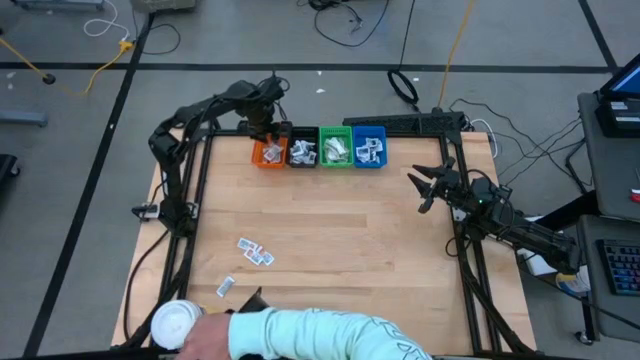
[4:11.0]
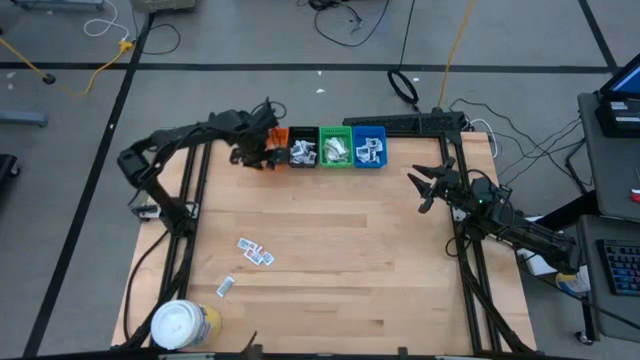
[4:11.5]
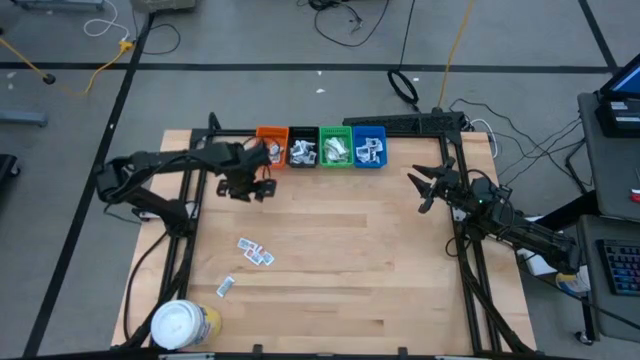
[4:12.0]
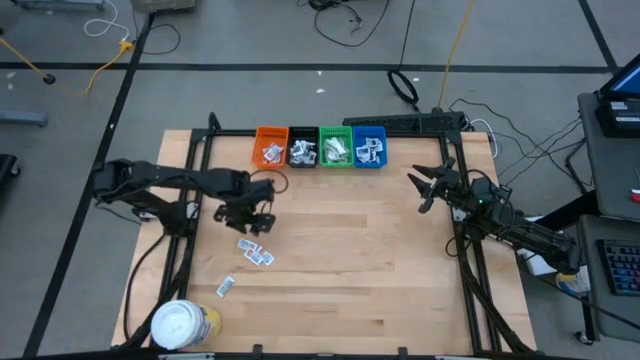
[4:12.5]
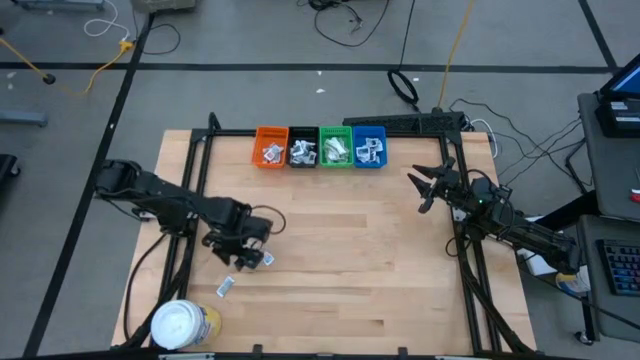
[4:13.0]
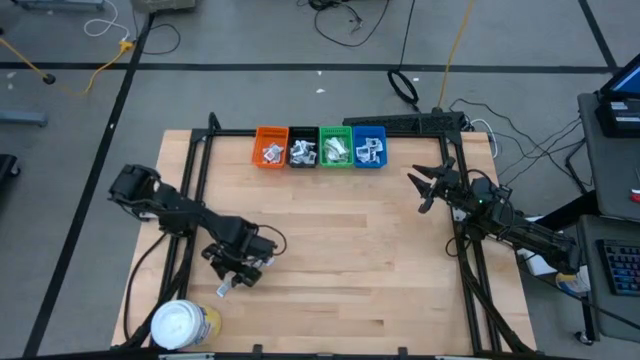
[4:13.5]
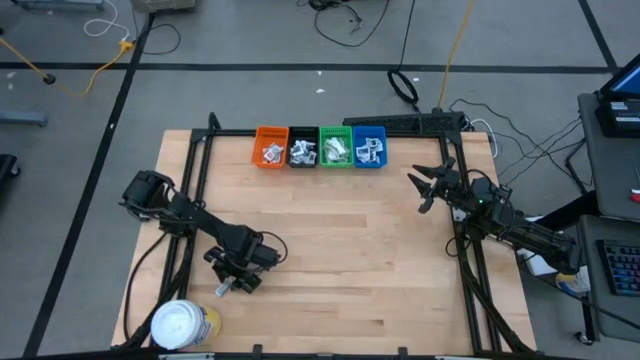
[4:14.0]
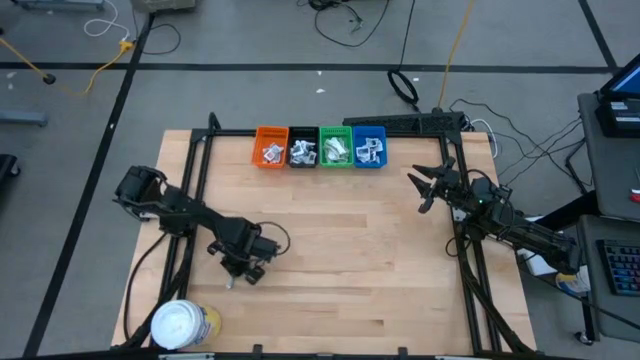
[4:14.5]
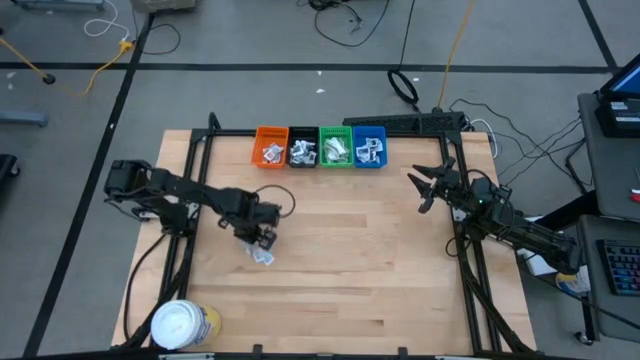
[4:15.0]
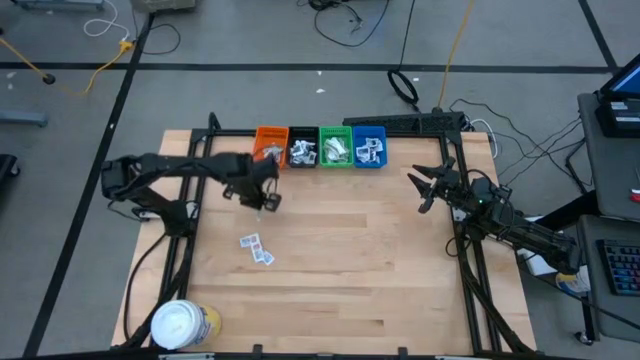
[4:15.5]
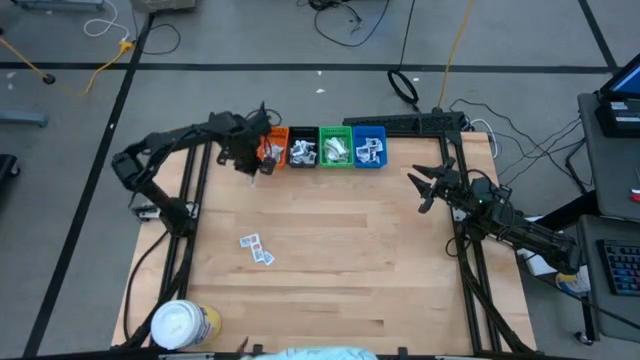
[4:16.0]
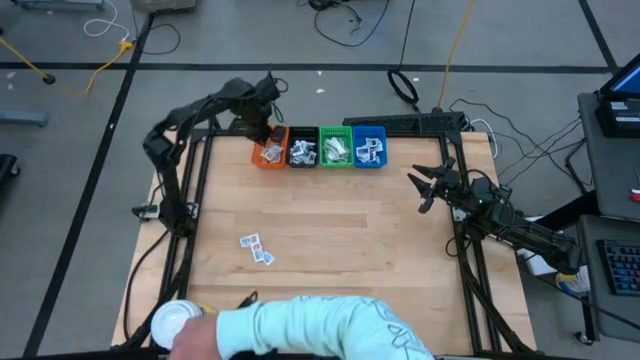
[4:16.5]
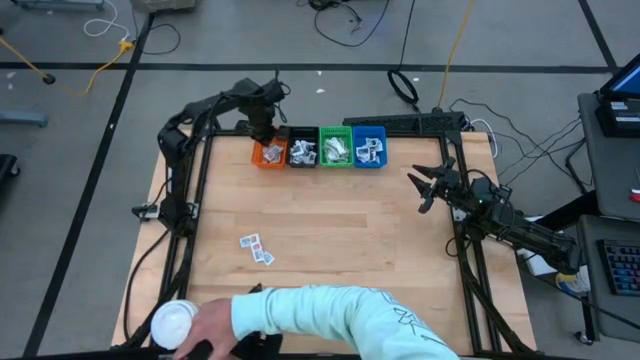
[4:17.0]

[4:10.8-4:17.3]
Task: Pick & Place First Aid Supplies
Put the red packet into the orange bin

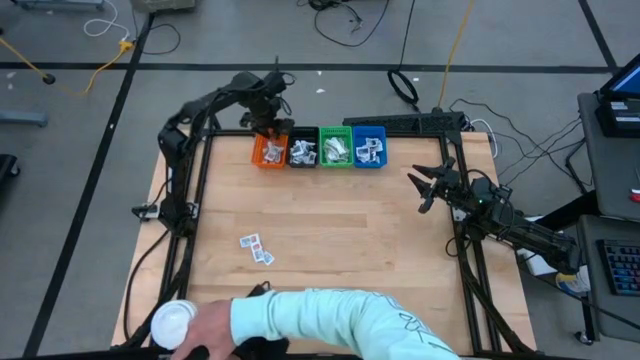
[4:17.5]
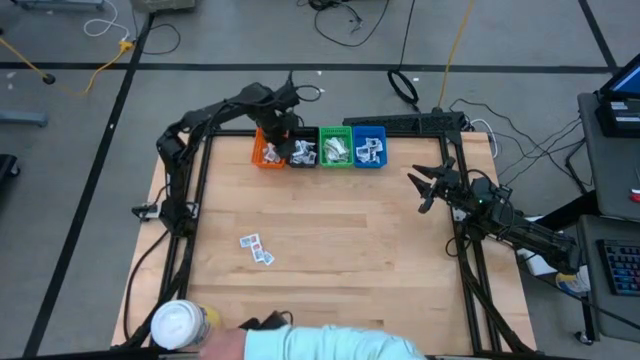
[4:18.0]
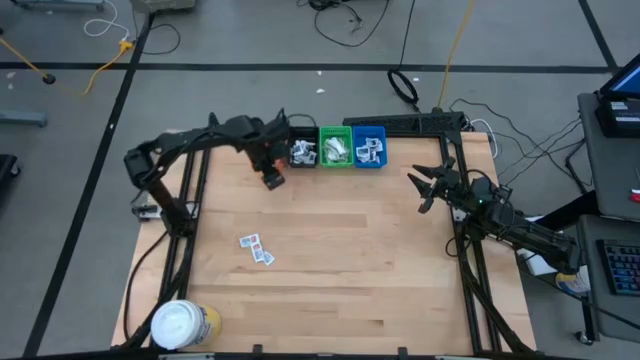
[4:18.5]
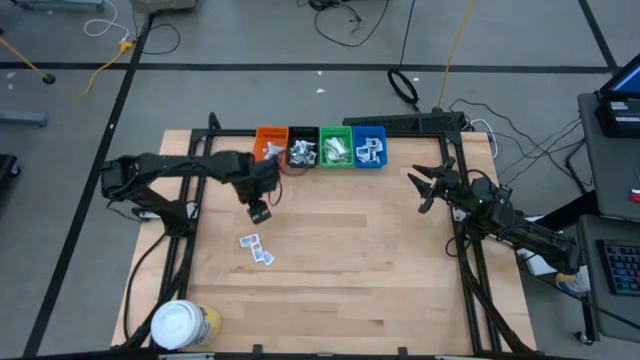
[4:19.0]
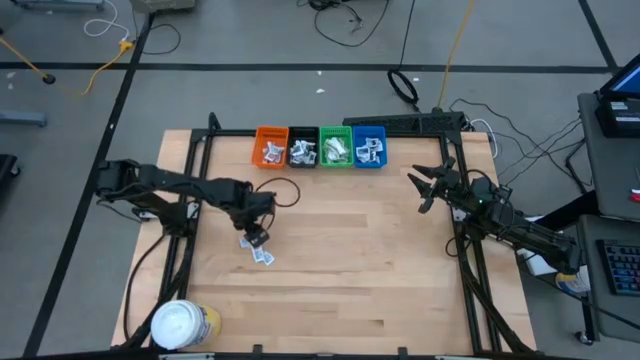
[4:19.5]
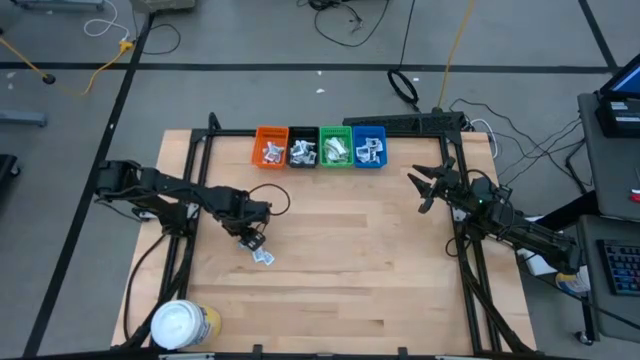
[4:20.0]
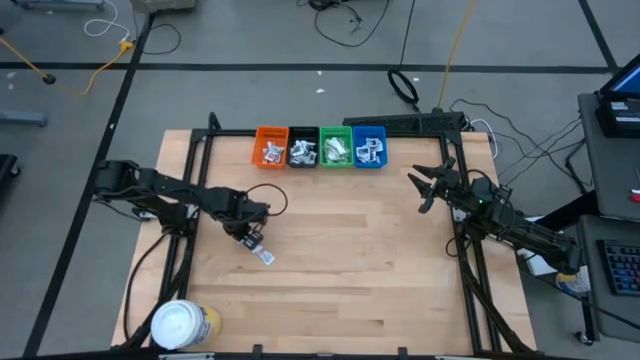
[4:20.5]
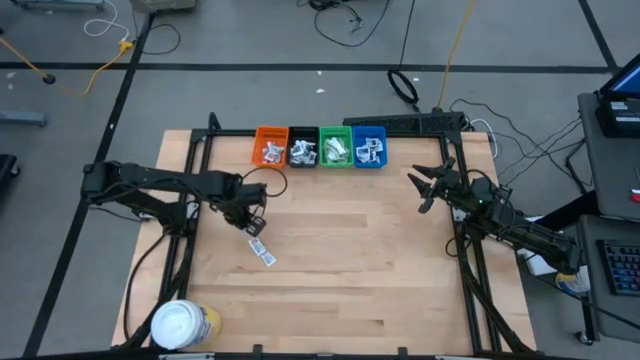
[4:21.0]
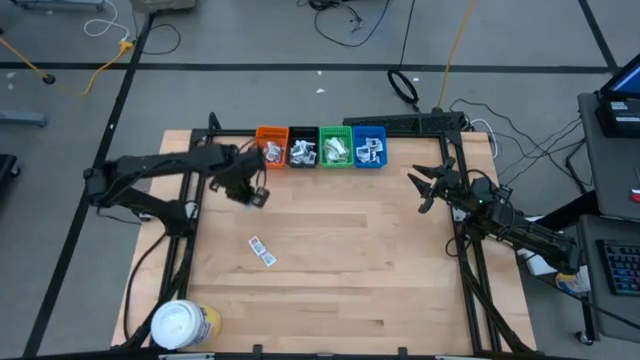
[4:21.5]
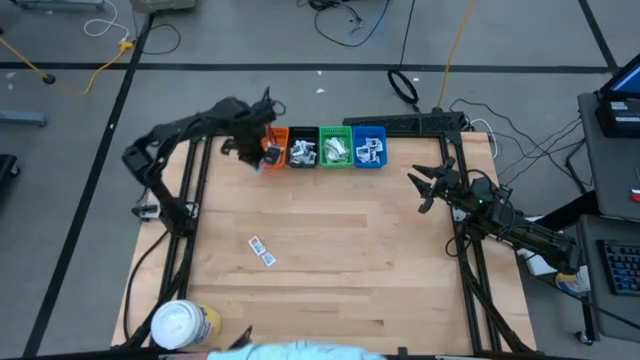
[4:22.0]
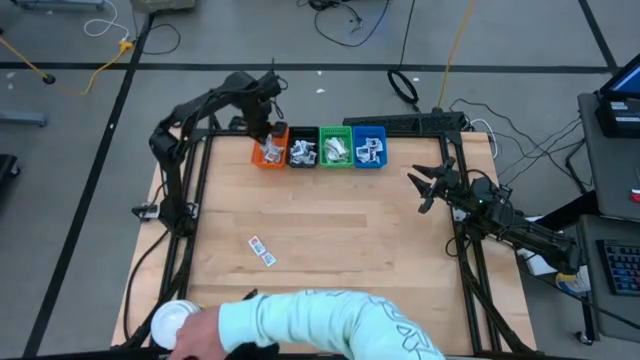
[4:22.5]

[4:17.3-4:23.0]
Put the red packet into the orange bin

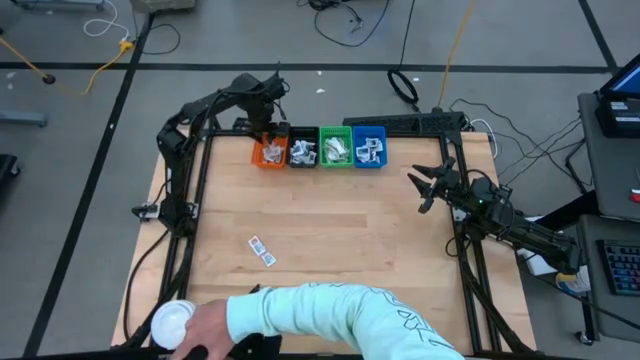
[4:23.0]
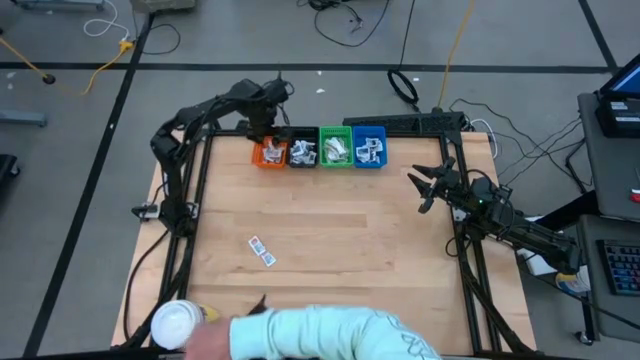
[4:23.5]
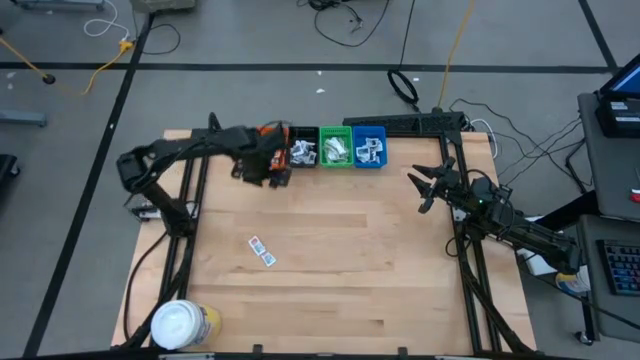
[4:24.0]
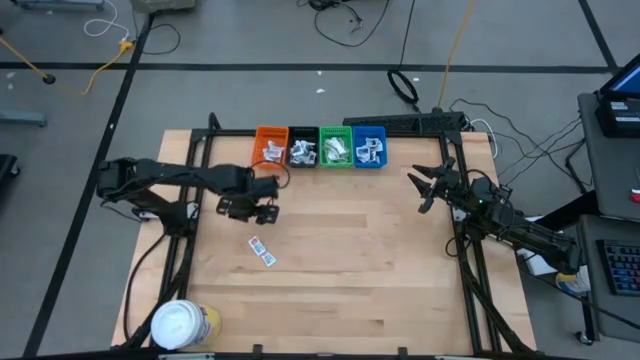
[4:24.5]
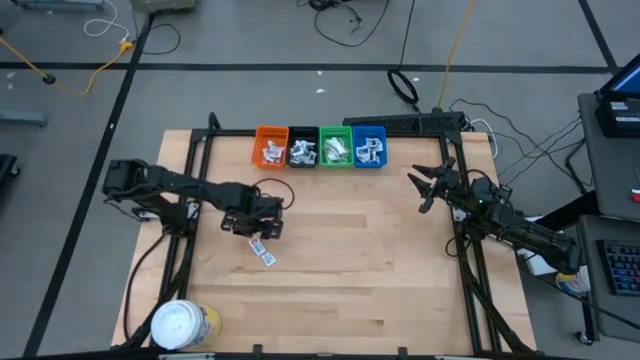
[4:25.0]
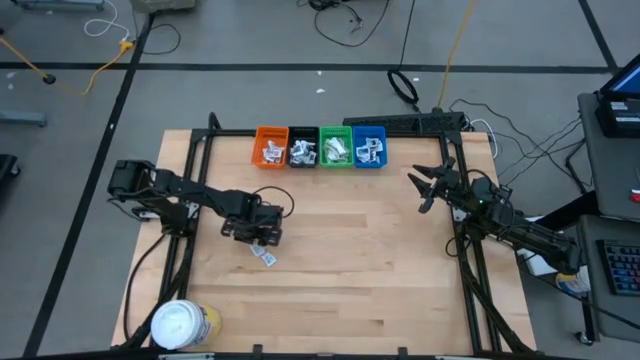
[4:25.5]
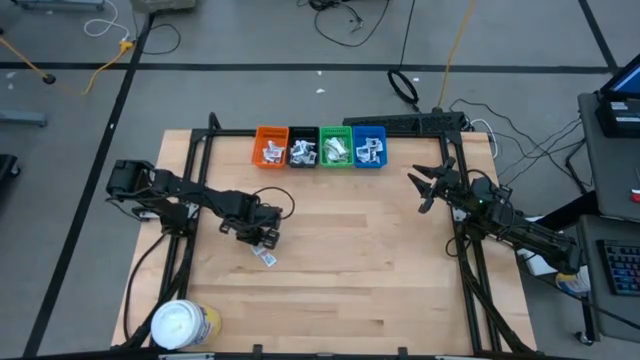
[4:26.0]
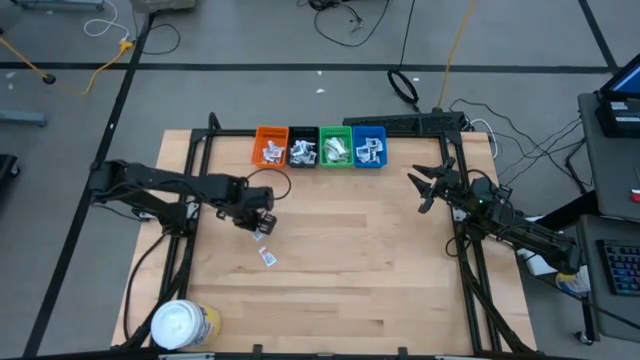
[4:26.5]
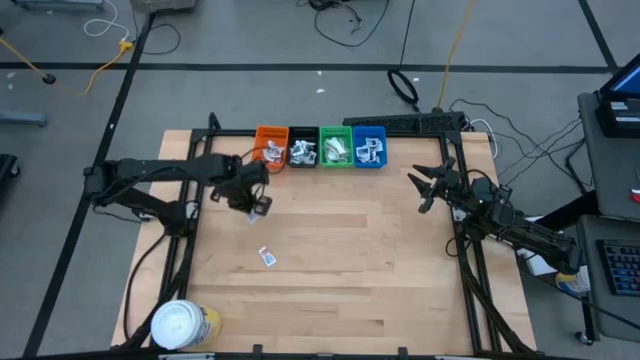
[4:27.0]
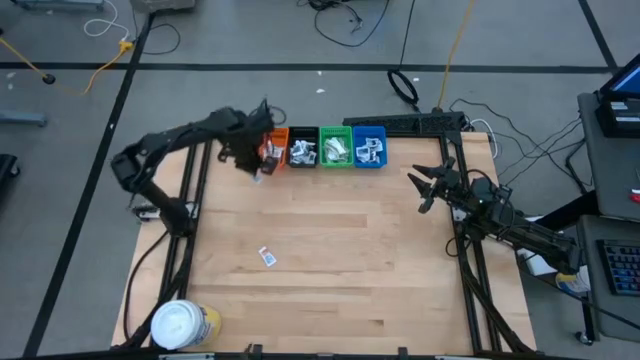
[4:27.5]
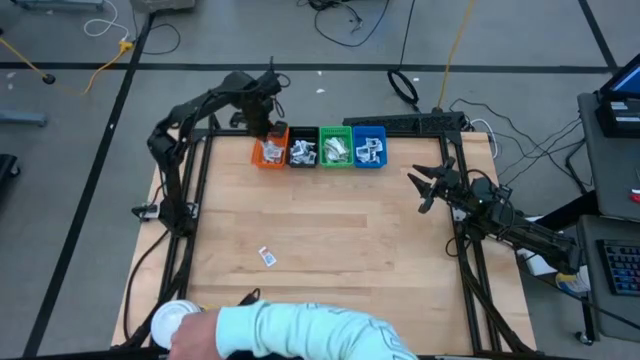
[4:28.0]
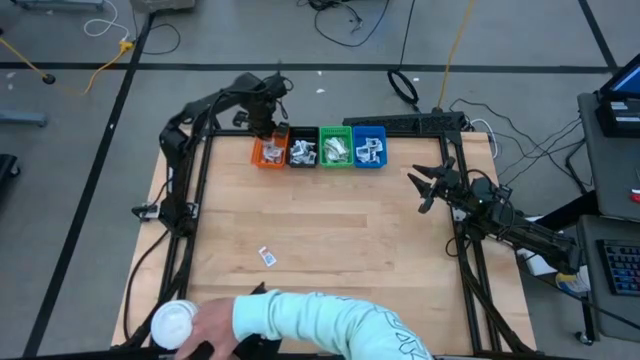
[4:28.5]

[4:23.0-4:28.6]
Put the red packet into the orange bin

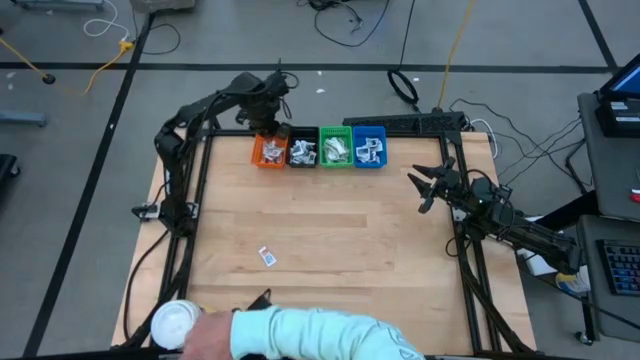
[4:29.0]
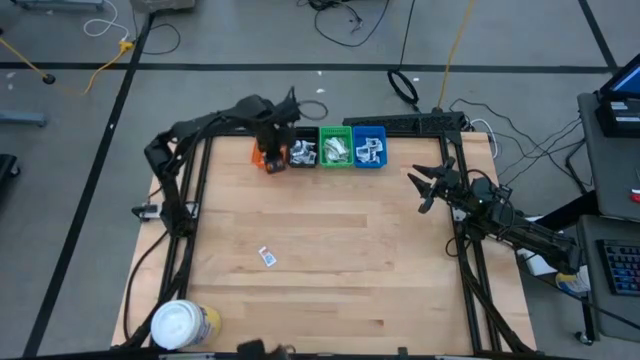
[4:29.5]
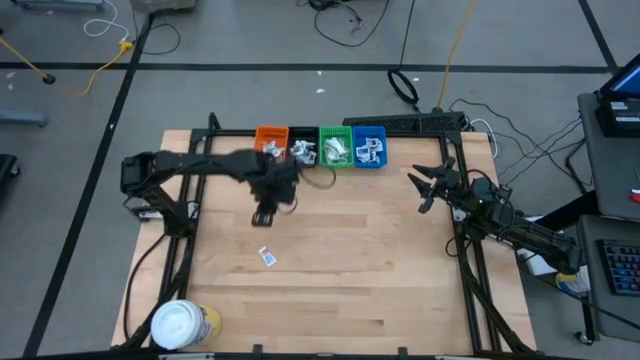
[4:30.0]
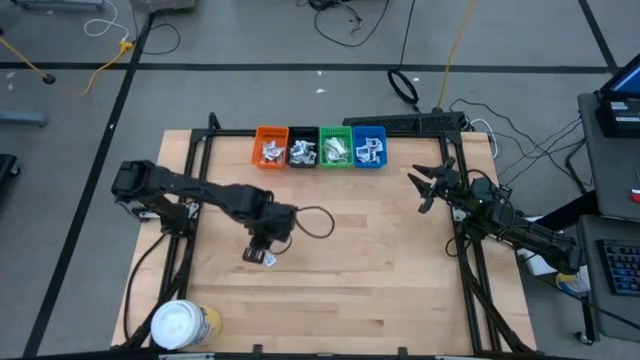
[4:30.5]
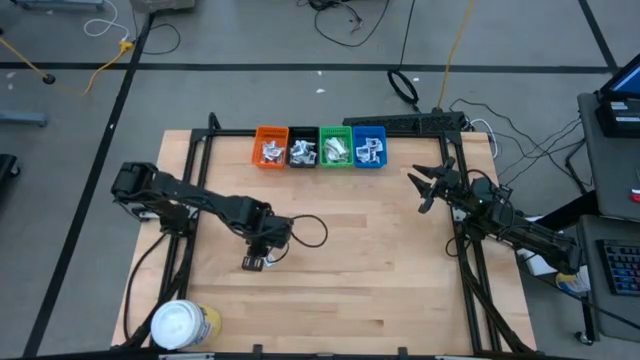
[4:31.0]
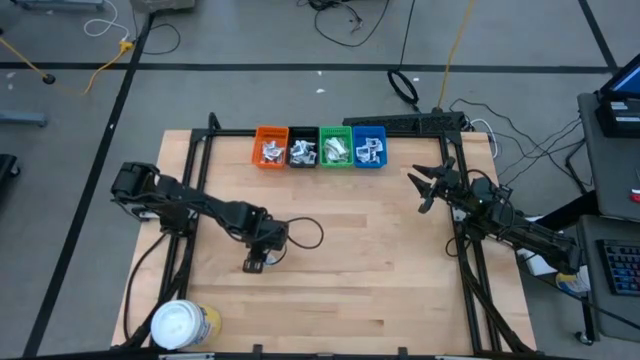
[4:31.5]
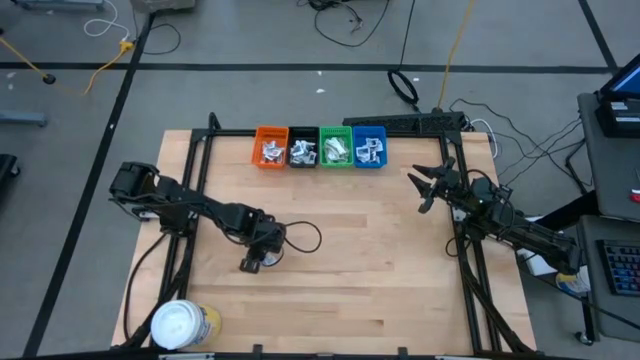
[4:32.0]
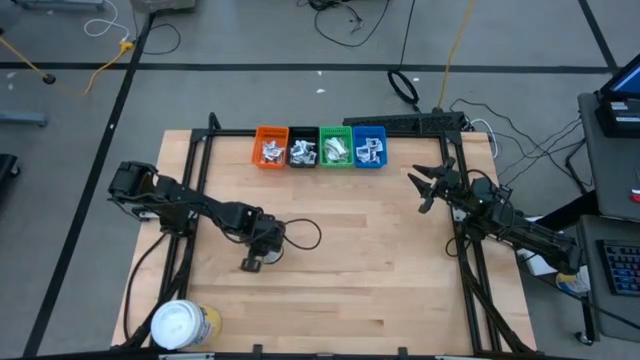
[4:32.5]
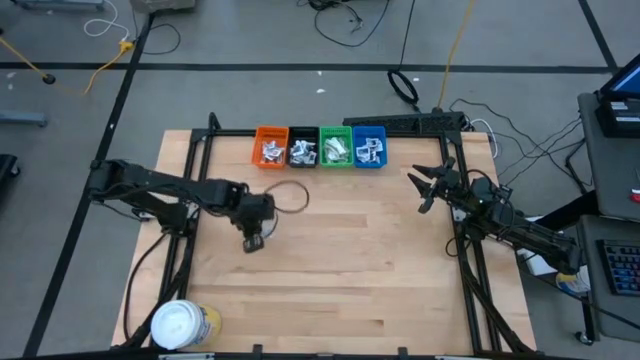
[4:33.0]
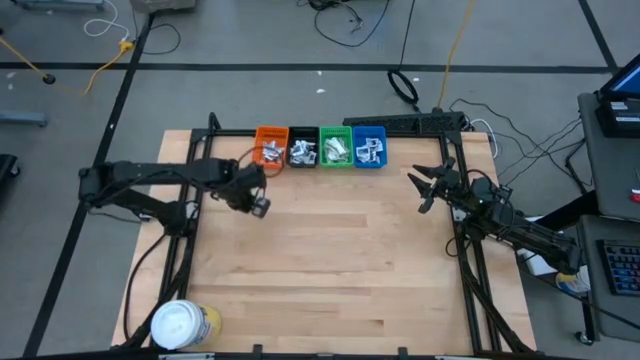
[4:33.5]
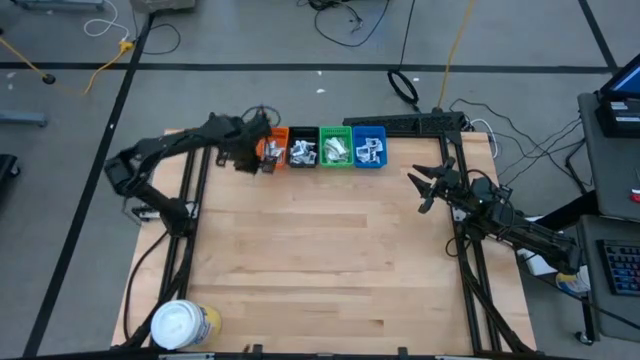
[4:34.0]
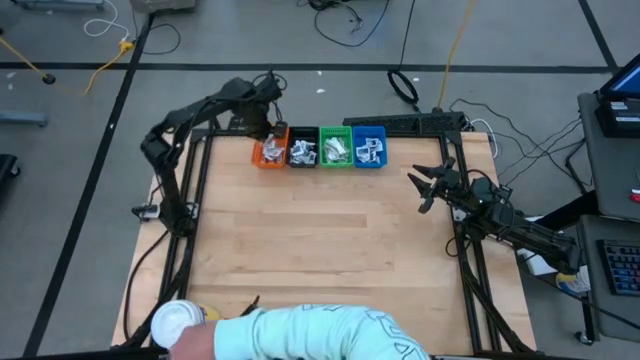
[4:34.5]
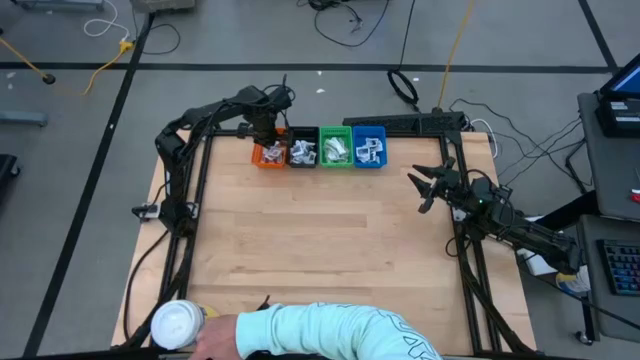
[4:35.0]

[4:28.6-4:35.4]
Put the red packet into the orange bin
